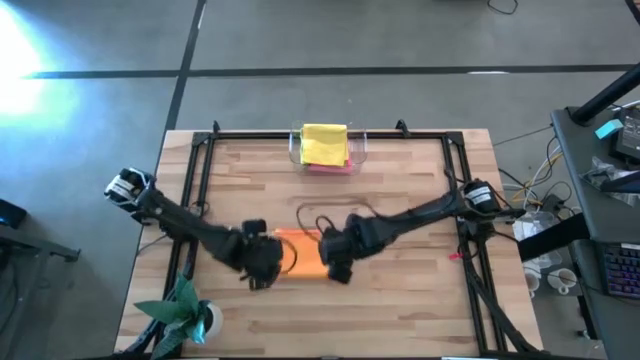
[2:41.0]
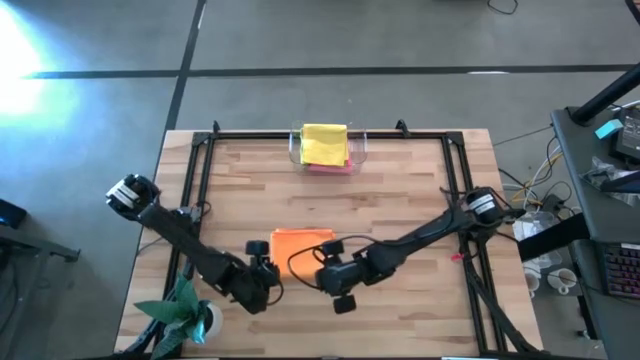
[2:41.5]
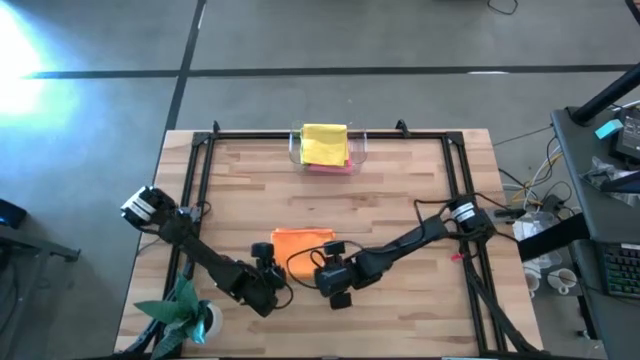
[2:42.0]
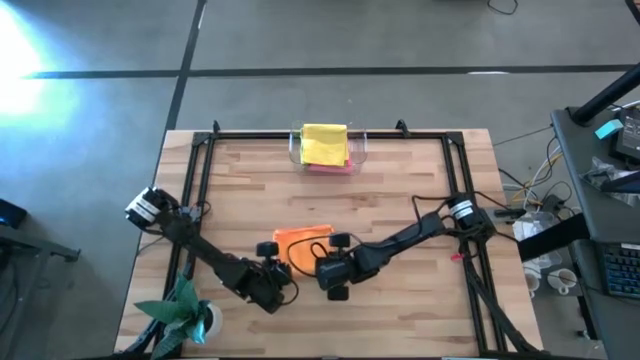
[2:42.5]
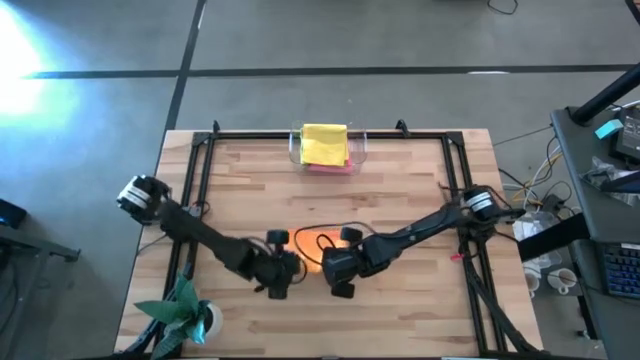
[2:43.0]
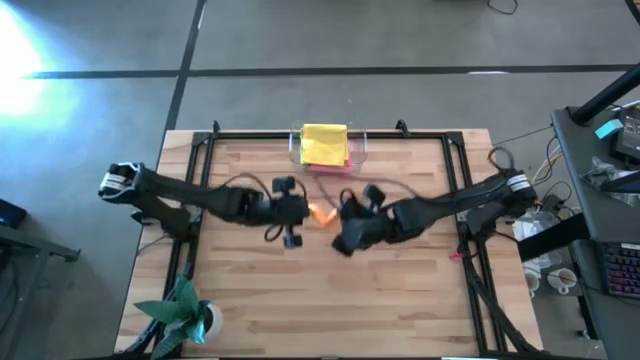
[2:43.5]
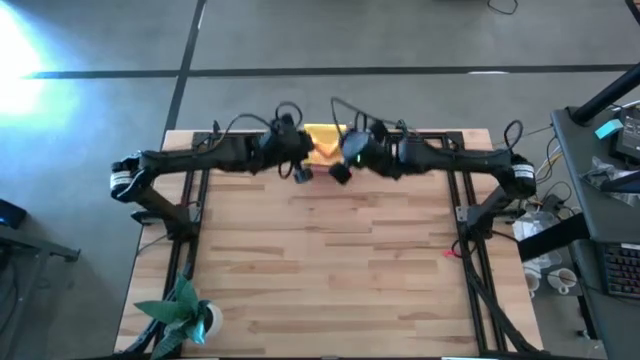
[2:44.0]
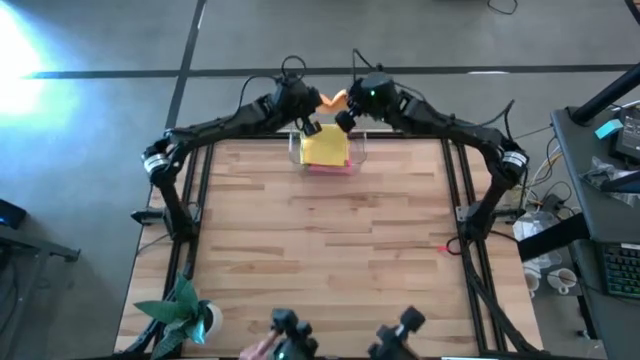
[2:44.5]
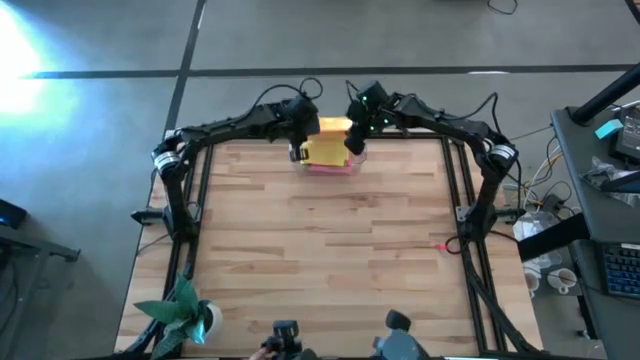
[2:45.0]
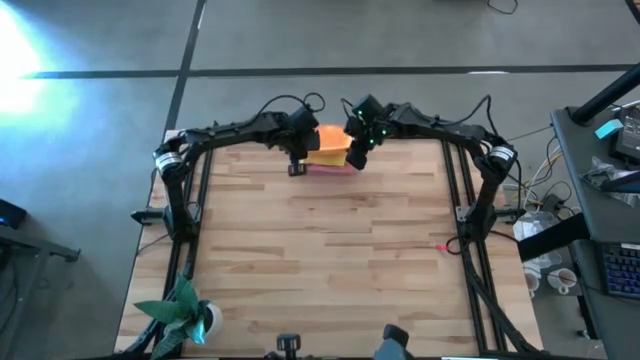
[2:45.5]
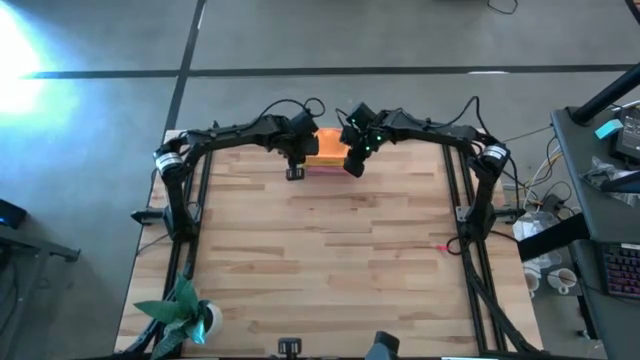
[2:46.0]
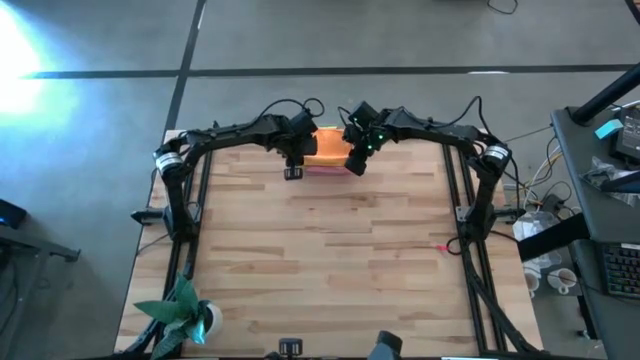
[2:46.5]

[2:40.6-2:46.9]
Task: Fold microfiber towels
Put the orange microfiber towel into the transparent bin

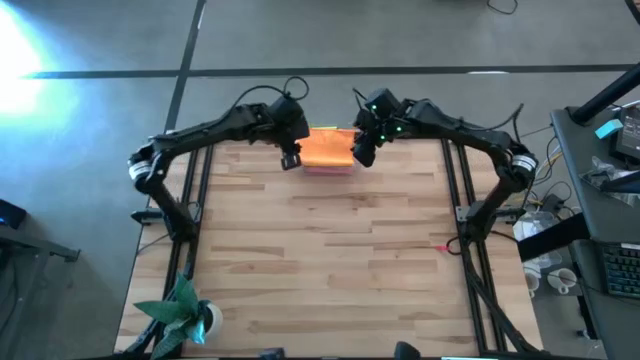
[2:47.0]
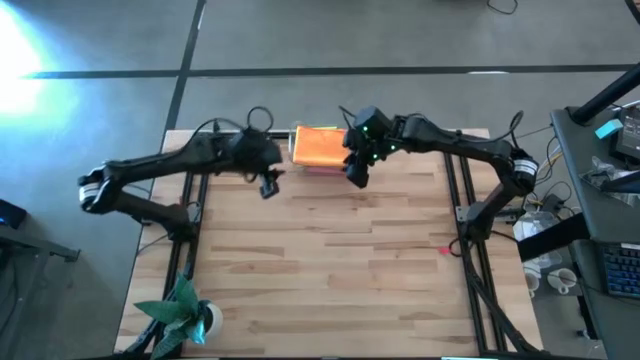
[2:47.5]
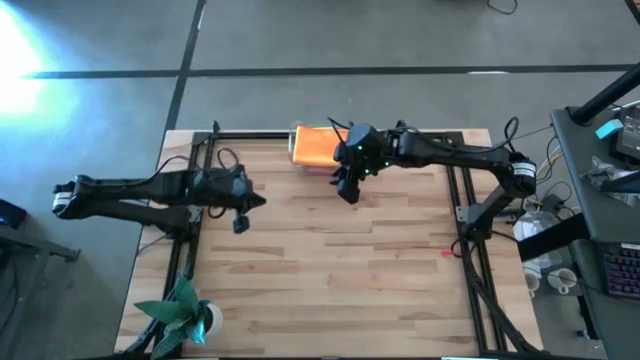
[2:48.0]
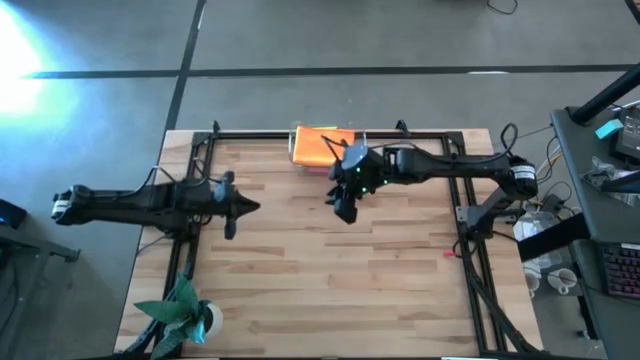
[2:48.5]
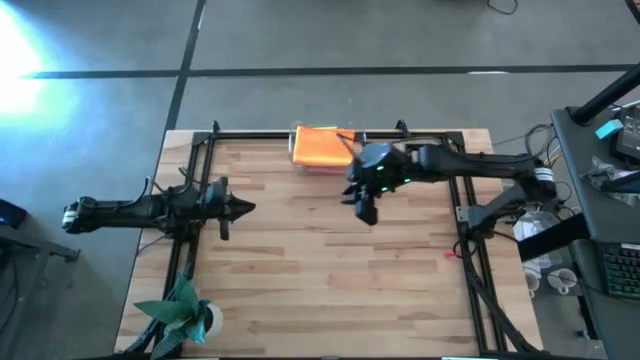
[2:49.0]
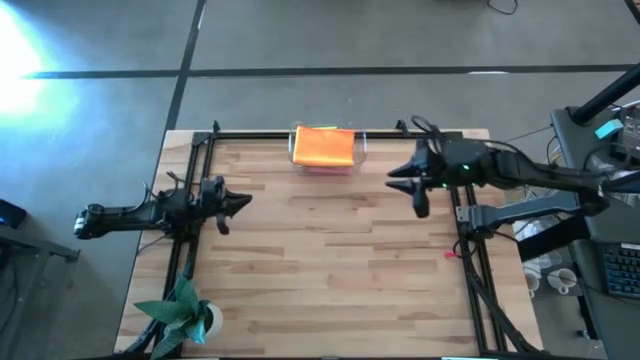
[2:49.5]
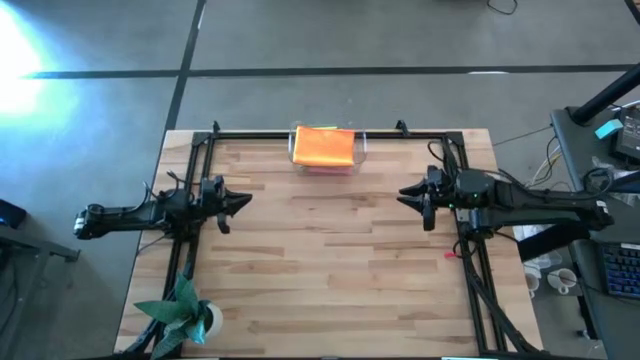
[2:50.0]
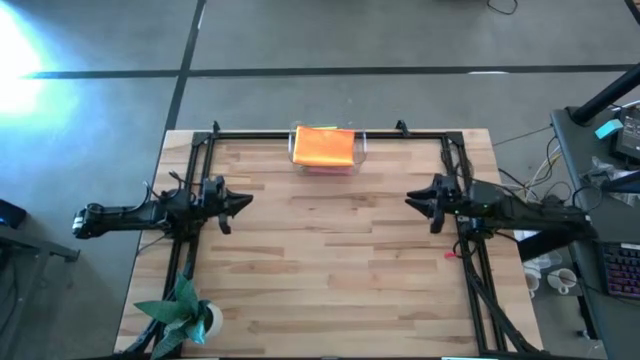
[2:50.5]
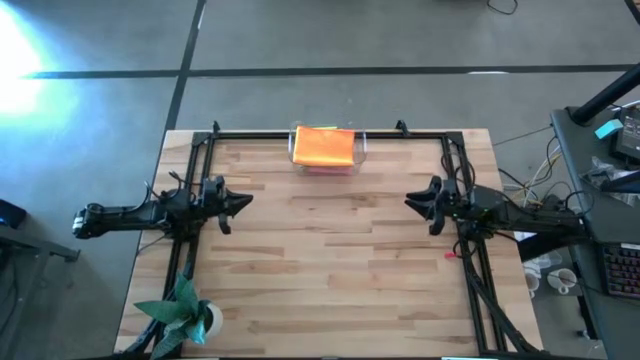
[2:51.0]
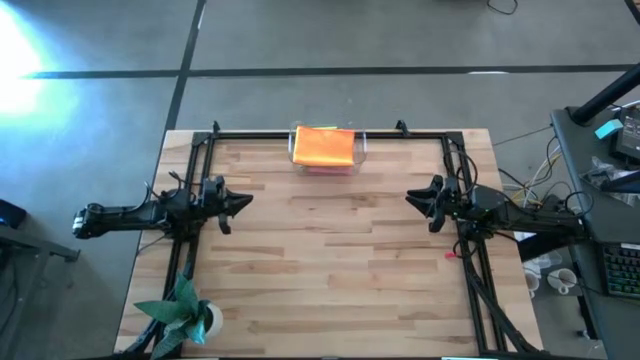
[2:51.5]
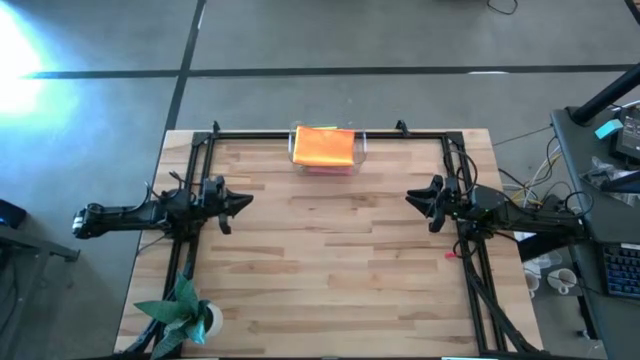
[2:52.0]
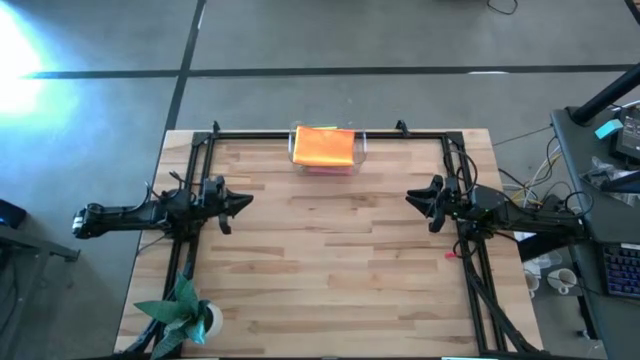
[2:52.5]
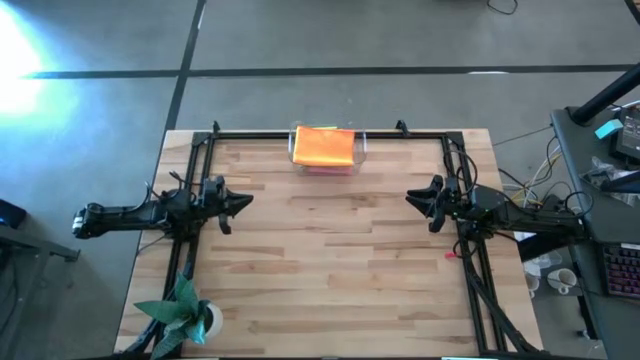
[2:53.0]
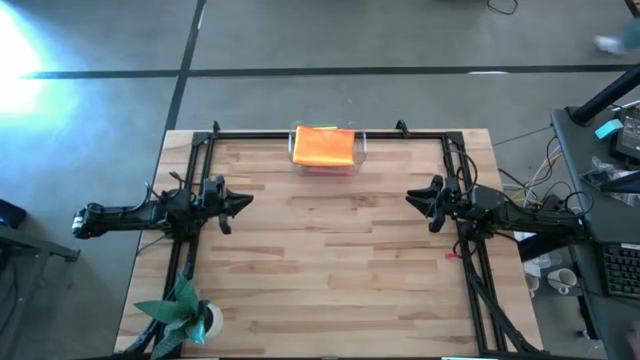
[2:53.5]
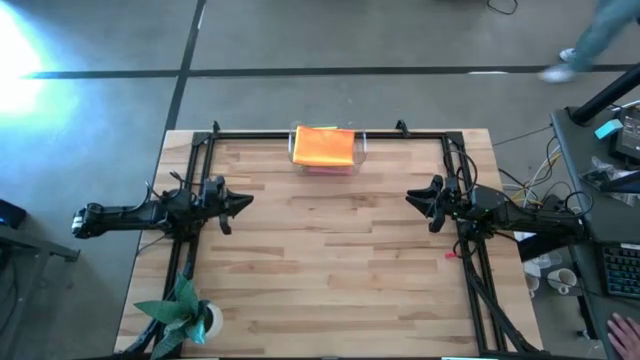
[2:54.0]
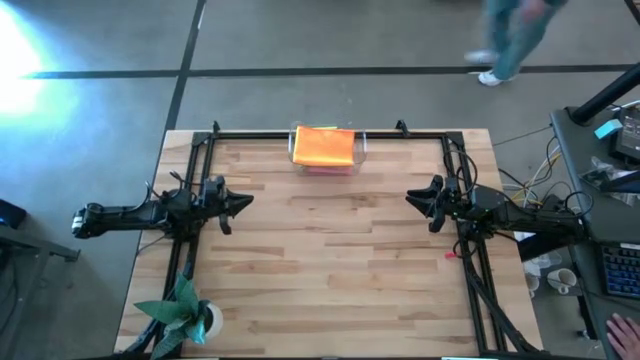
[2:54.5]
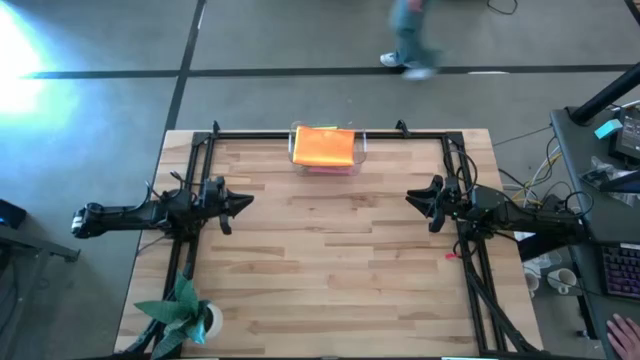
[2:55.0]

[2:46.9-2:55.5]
Return to Home Position
